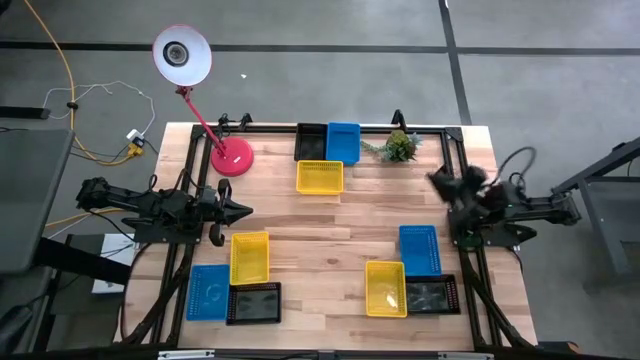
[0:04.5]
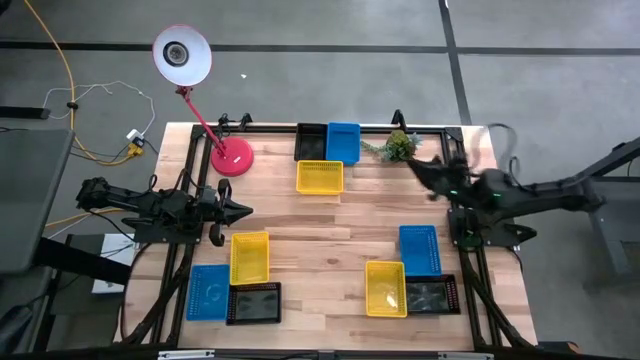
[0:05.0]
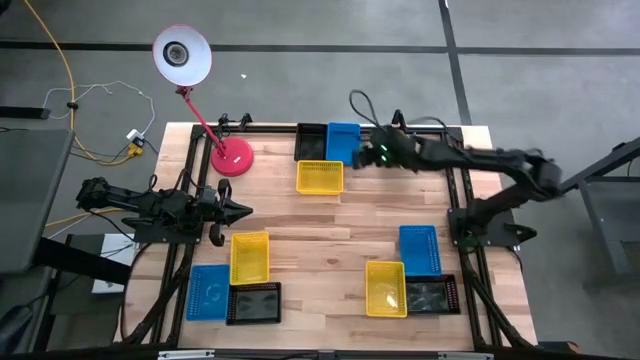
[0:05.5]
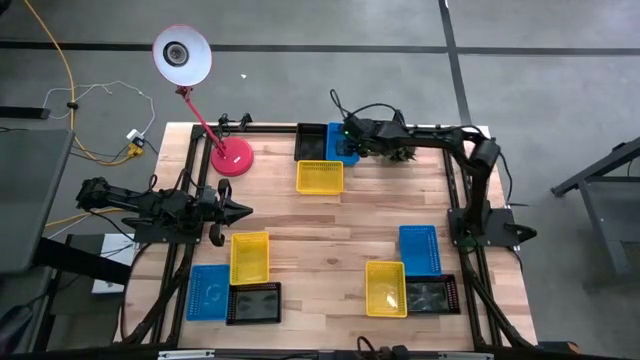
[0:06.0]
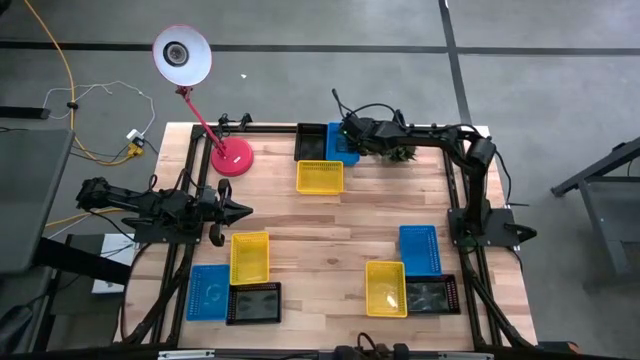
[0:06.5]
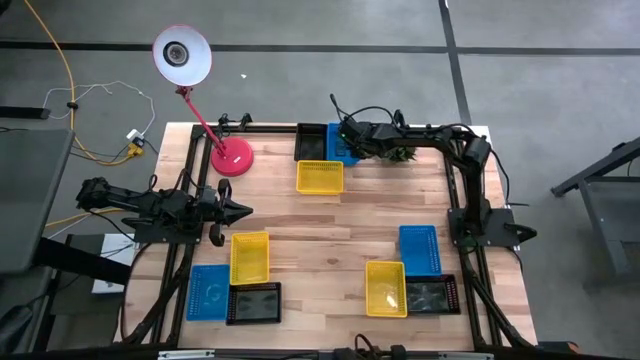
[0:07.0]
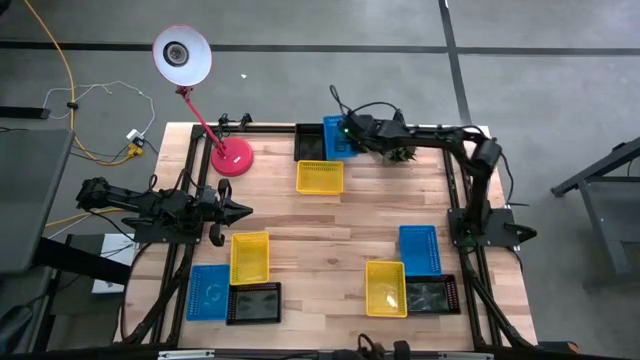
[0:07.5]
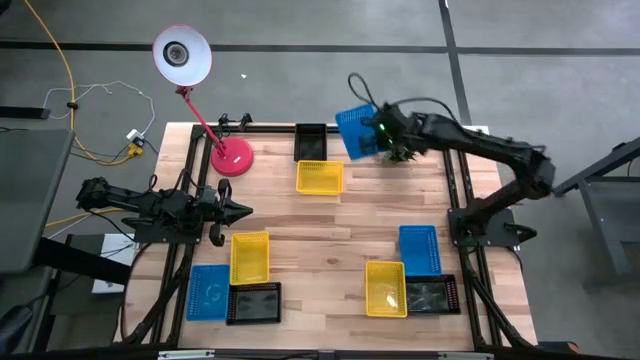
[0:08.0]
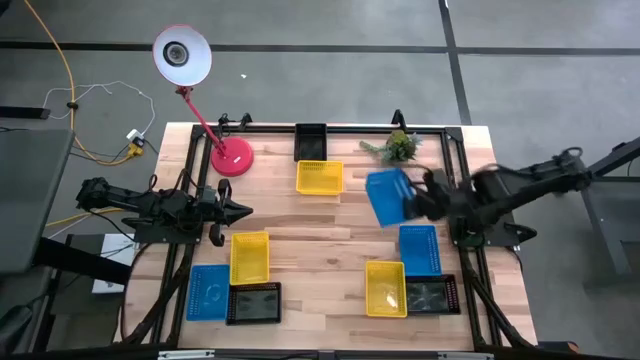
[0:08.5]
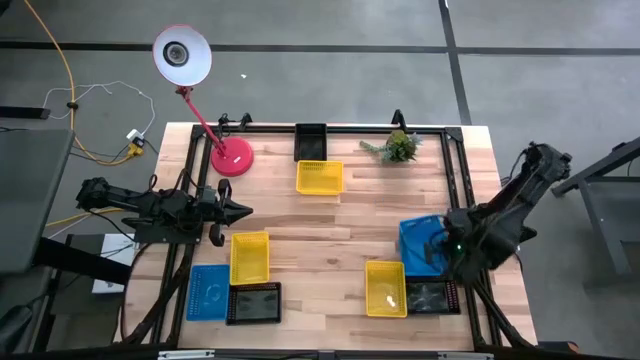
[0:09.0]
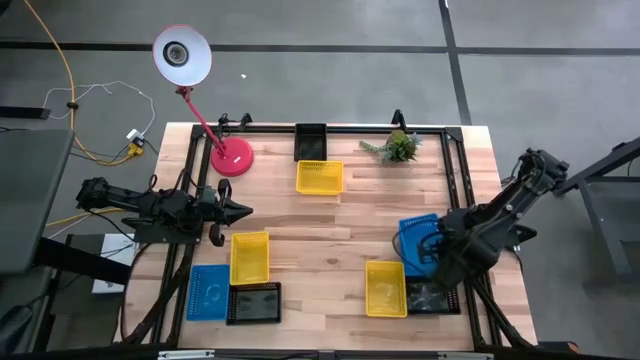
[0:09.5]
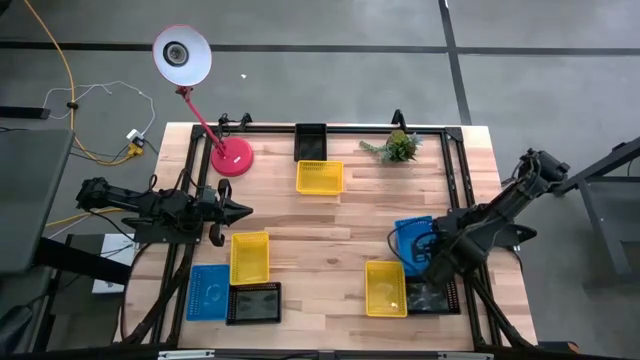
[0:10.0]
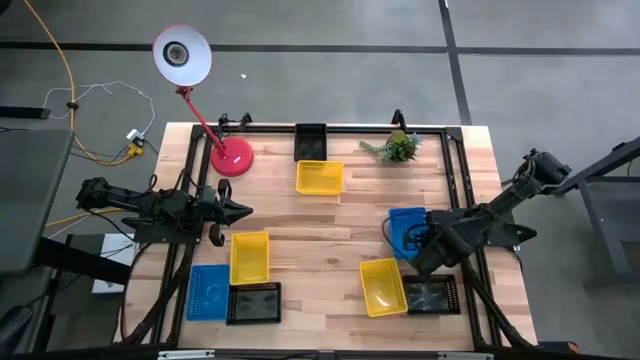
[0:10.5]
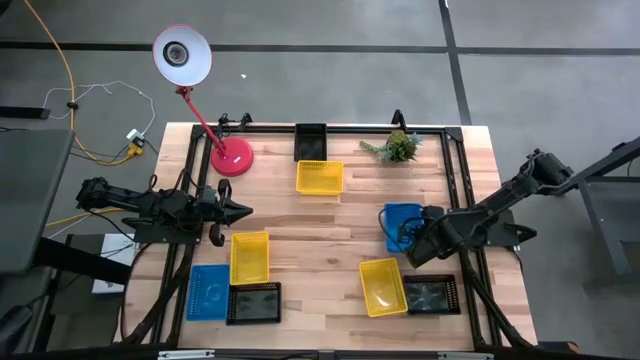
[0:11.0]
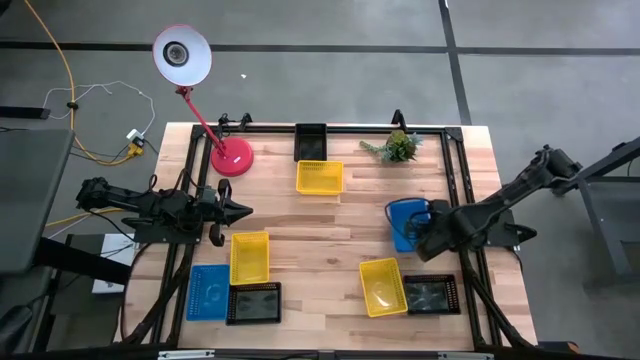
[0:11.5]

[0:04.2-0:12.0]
Stack the top blue bin on the right blue bin

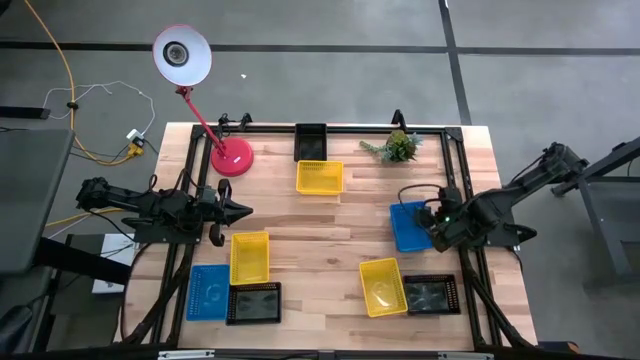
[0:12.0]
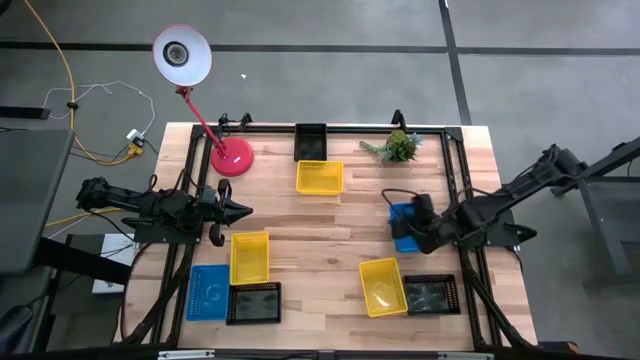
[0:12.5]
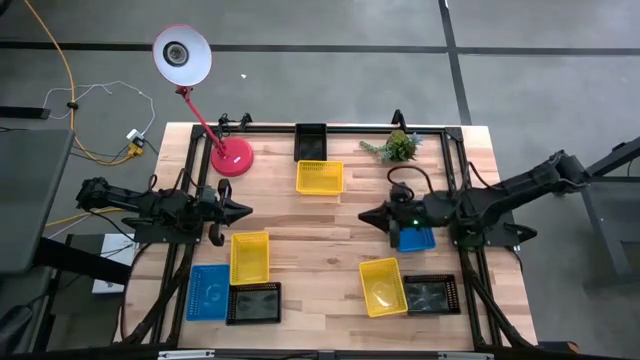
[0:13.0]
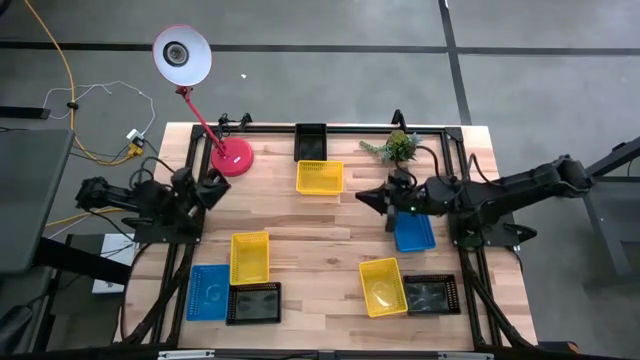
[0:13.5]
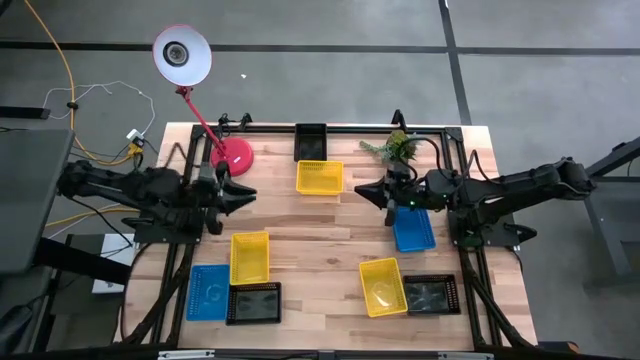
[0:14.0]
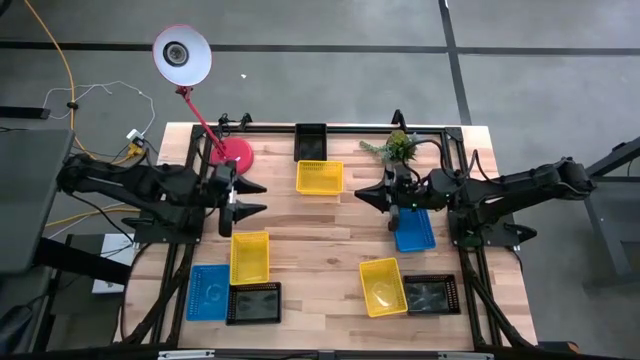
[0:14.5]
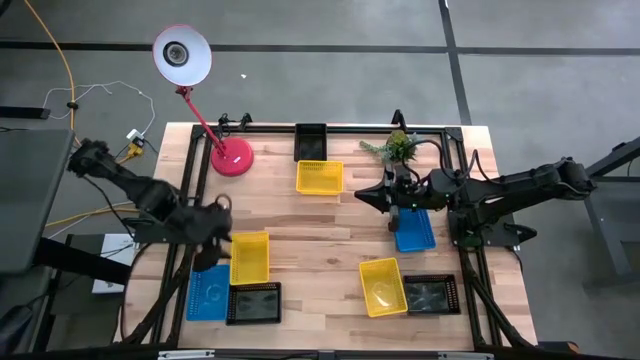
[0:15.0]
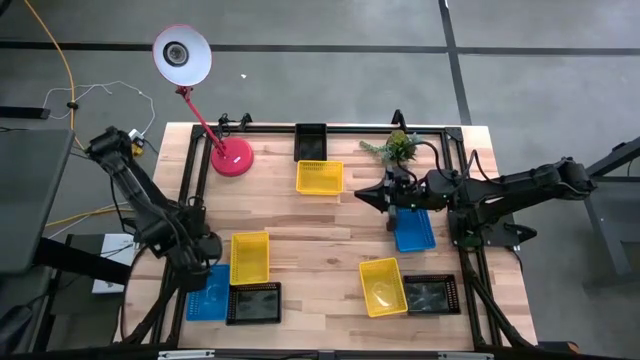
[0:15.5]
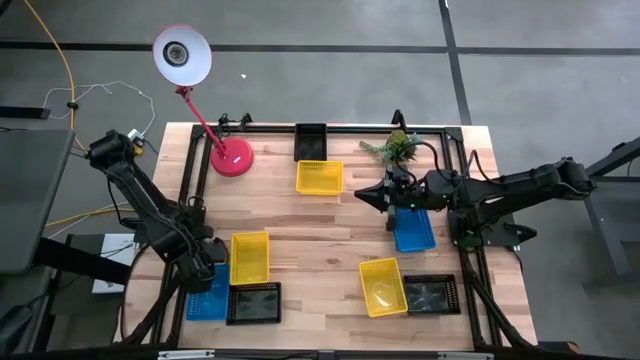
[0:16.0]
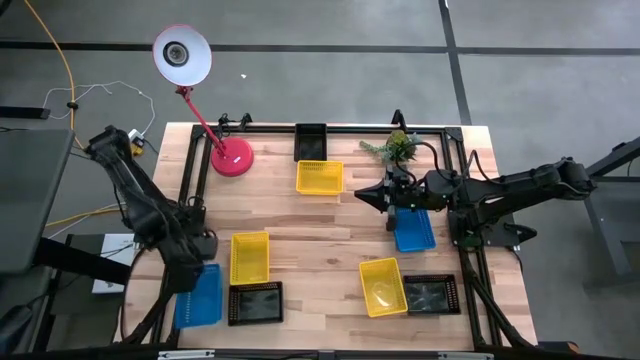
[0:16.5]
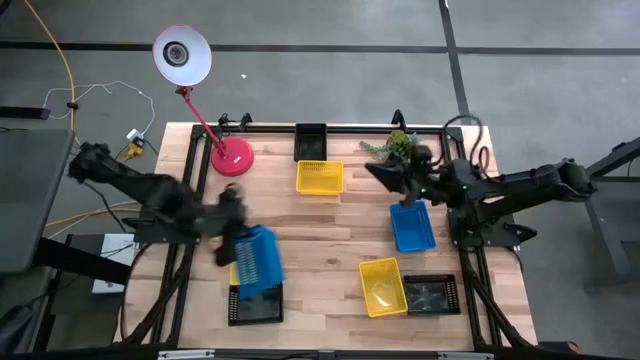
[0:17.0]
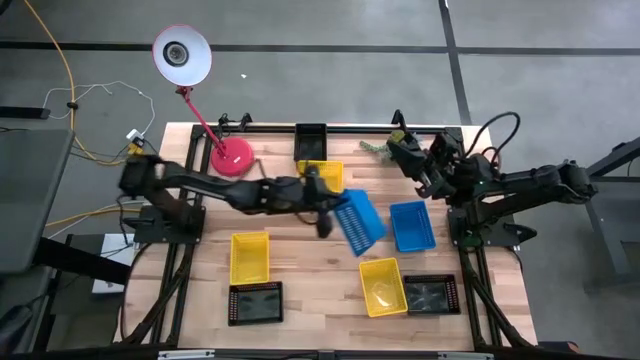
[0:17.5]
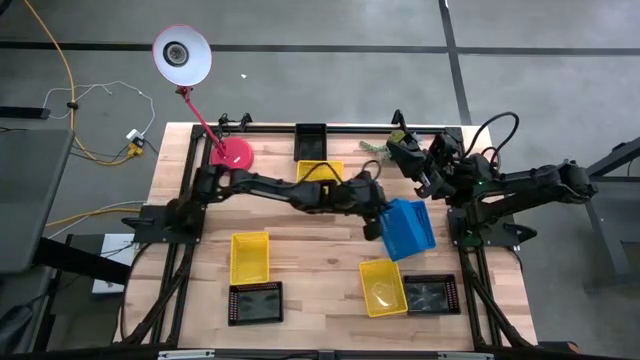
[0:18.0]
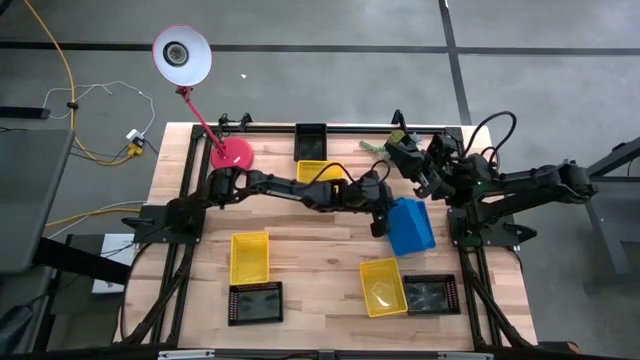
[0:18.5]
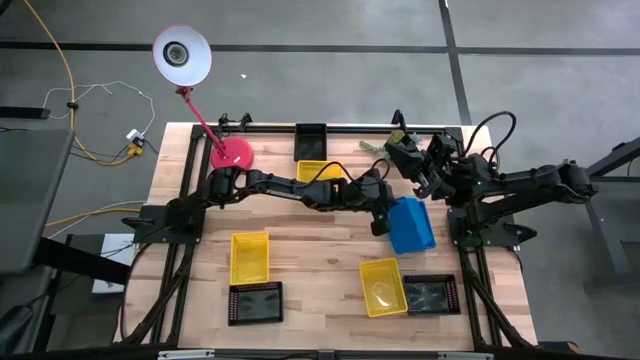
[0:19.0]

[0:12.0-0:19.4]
Stack the left blue bin on the right stacked blue bin

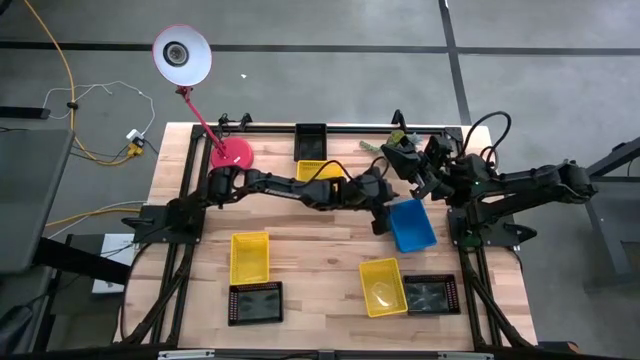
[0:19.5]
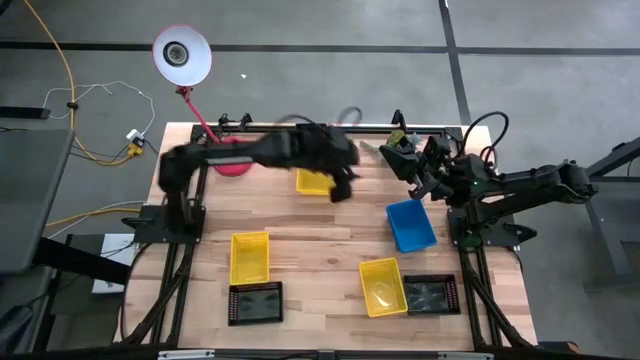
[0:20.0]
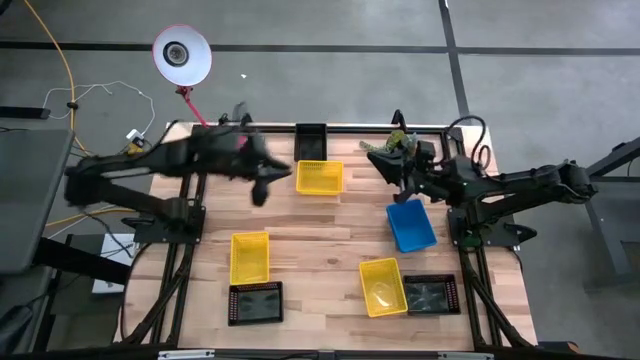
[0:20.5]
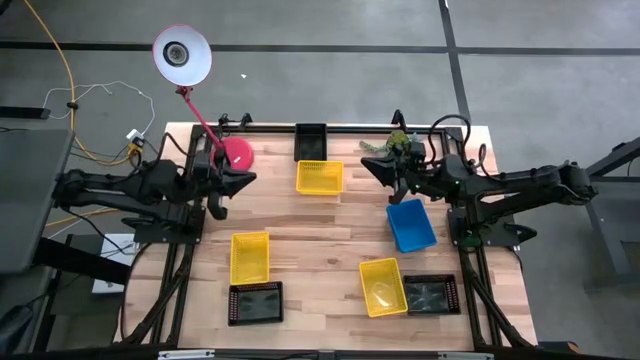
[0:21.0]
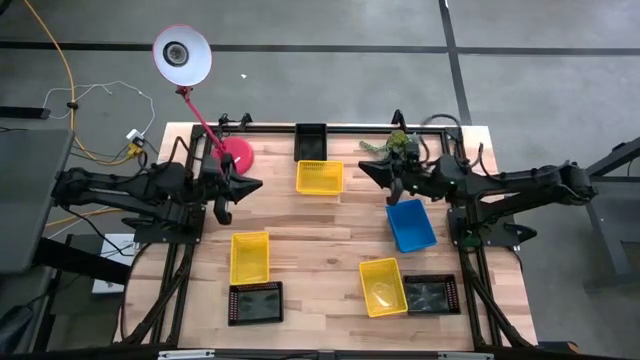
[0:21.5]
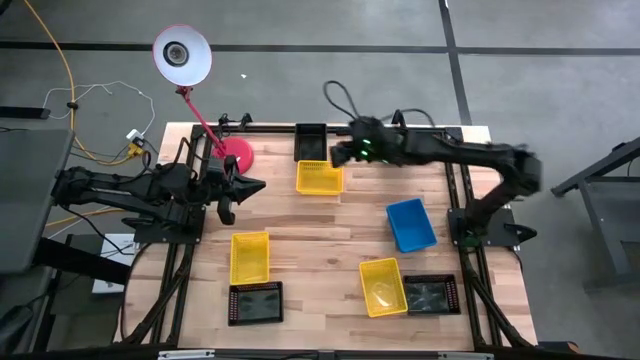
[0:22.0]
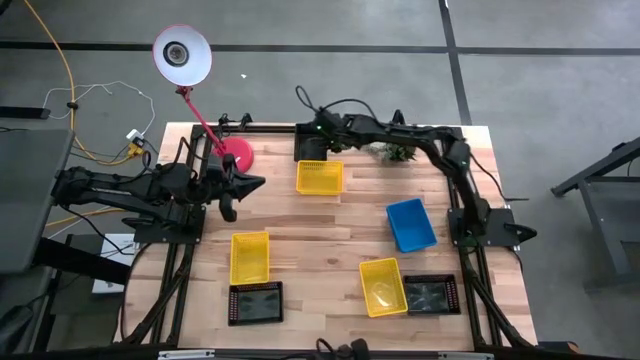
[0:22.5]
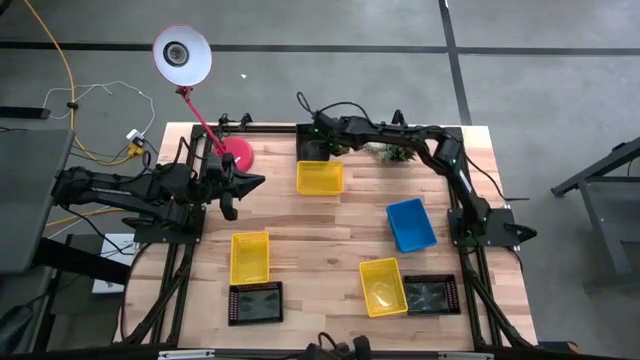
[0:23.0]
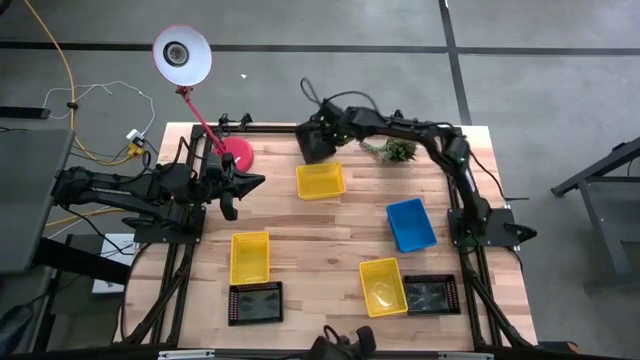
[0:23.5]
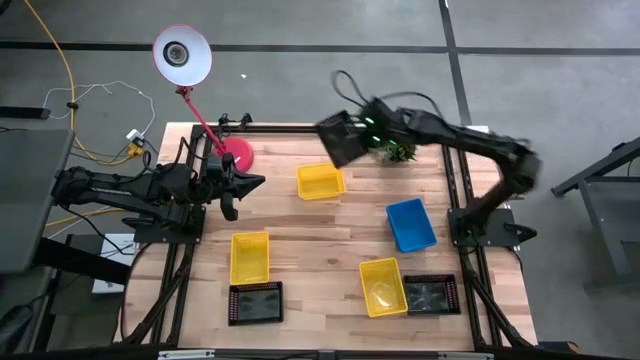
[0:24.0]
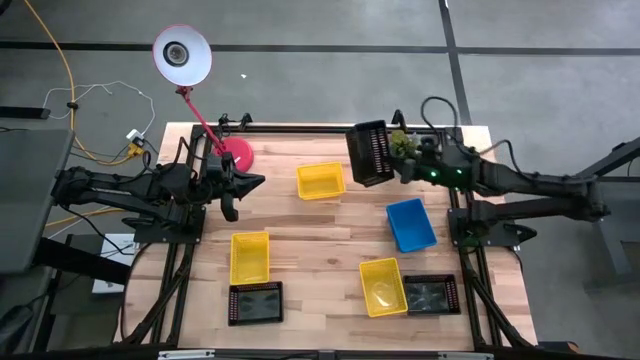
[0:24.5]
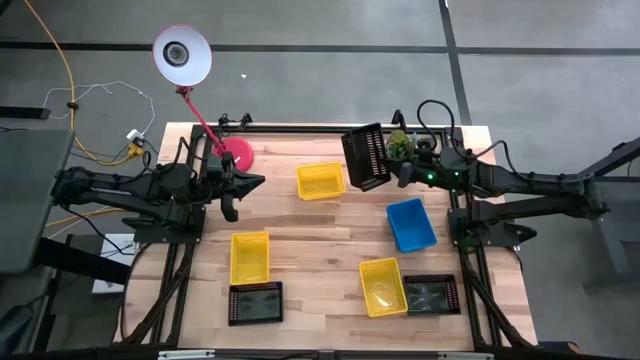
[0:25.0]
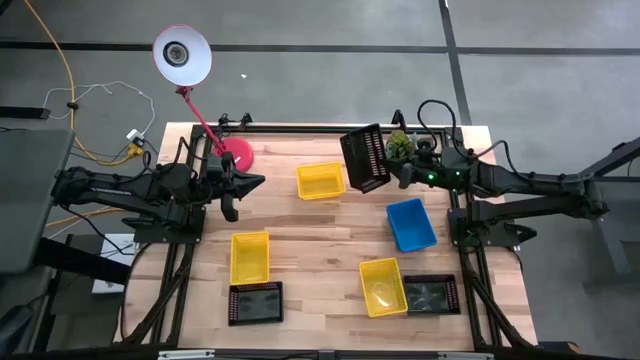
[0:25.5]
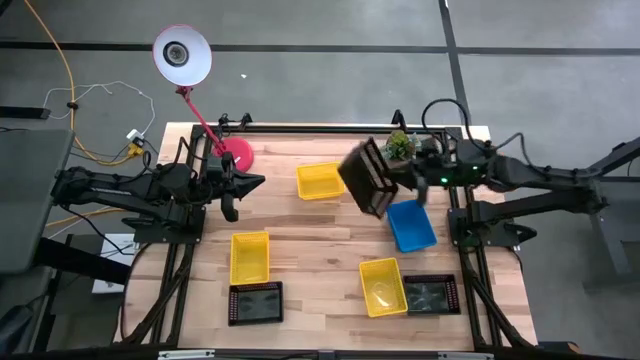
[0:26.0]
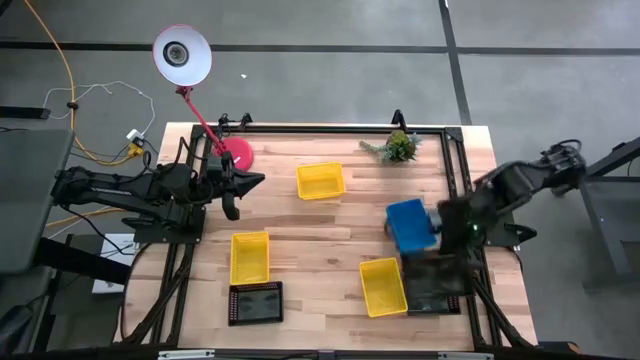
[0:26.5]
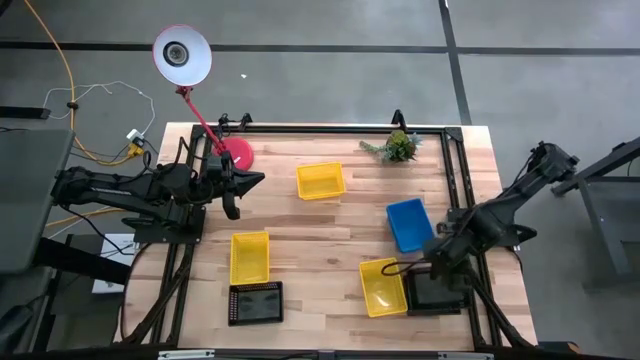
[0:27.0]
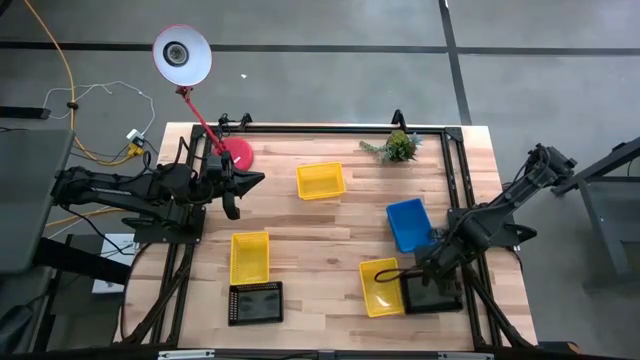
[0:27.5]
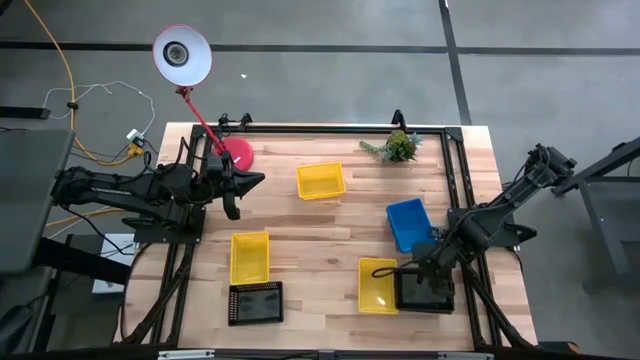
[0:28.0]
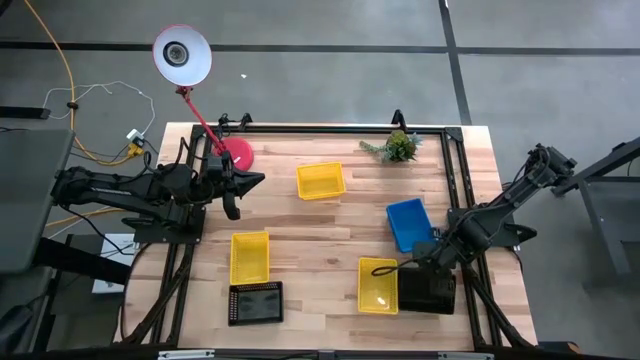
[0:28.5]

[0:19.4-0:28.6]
Stack the top black bin on the right black bin
